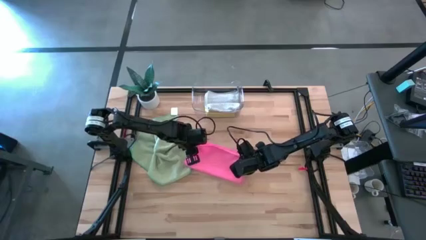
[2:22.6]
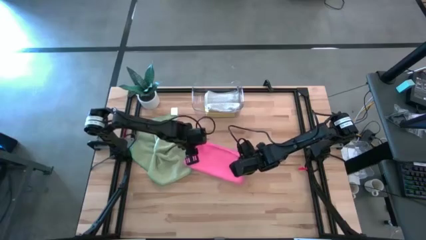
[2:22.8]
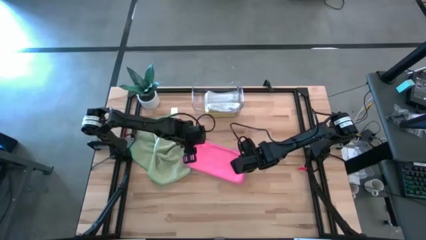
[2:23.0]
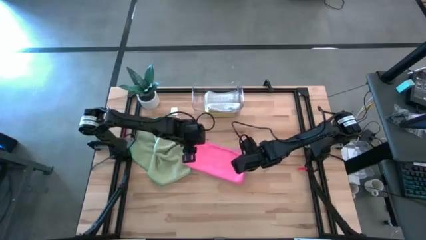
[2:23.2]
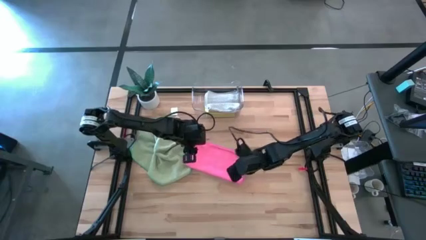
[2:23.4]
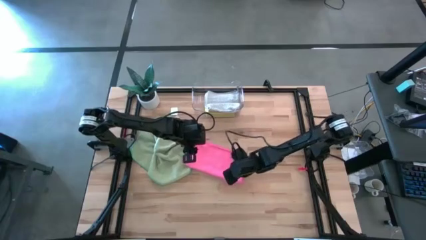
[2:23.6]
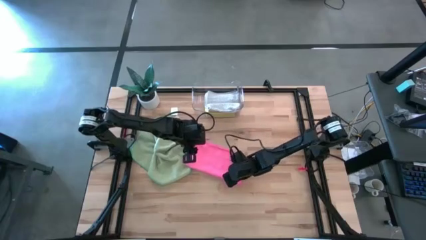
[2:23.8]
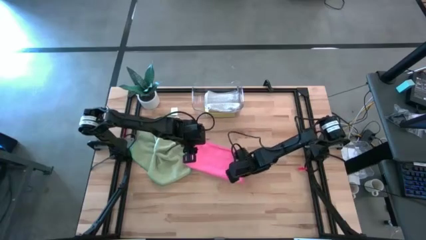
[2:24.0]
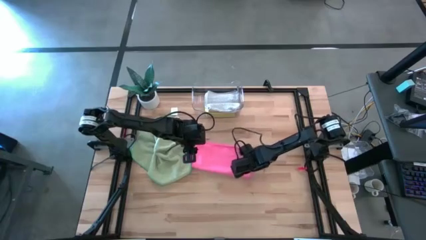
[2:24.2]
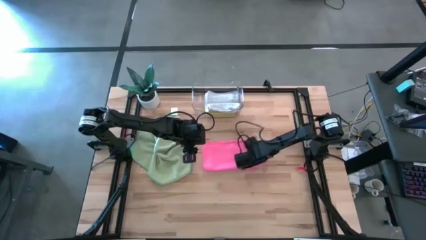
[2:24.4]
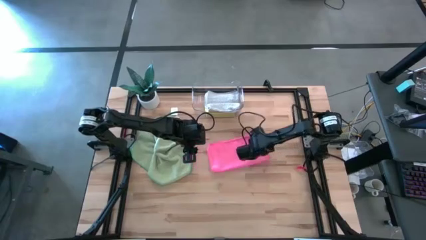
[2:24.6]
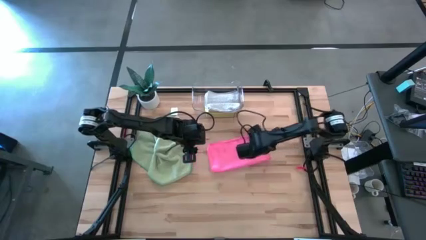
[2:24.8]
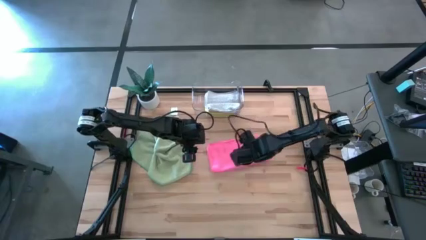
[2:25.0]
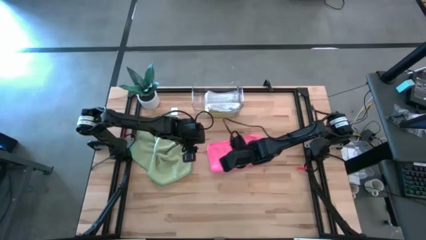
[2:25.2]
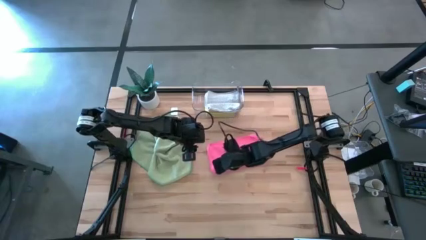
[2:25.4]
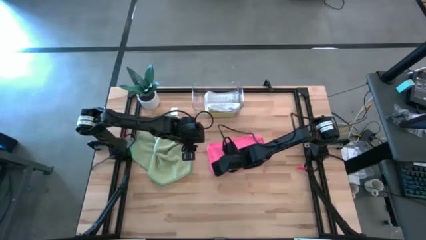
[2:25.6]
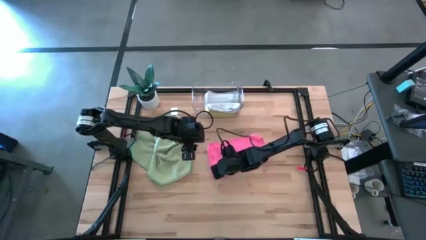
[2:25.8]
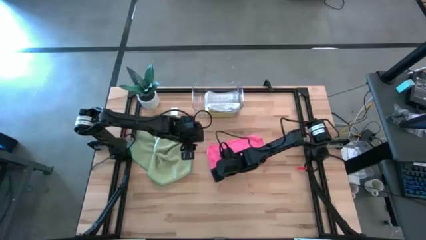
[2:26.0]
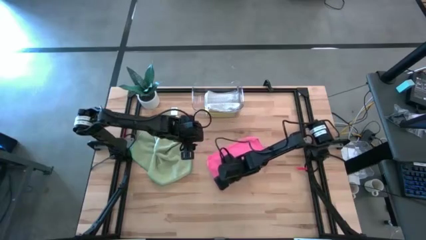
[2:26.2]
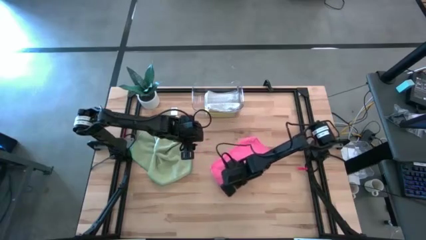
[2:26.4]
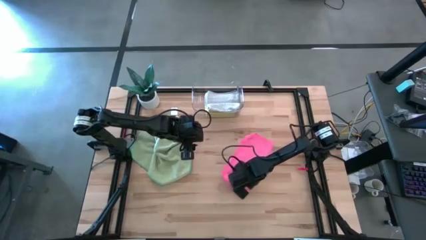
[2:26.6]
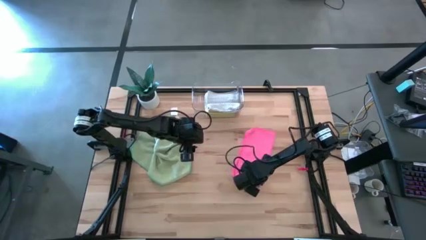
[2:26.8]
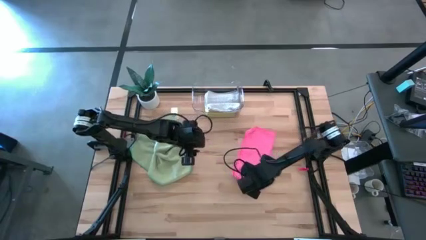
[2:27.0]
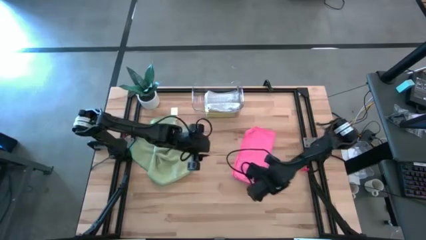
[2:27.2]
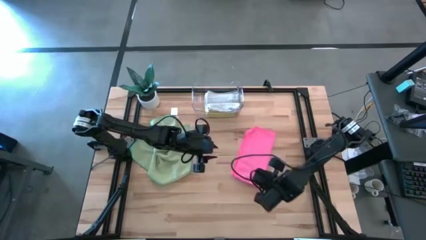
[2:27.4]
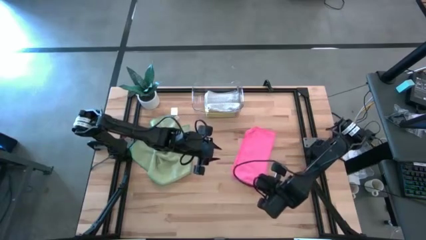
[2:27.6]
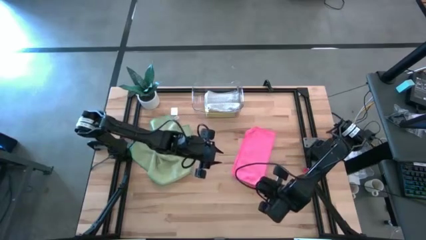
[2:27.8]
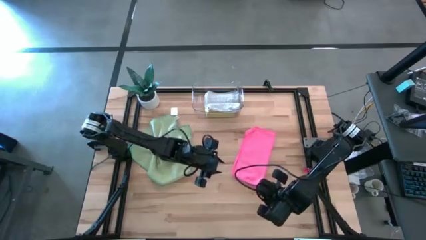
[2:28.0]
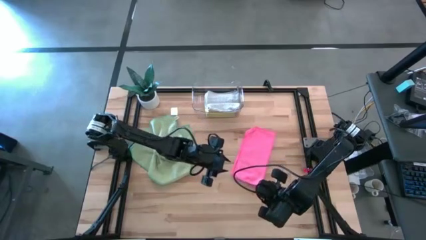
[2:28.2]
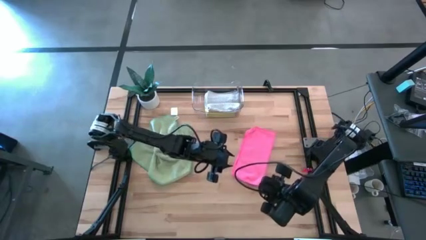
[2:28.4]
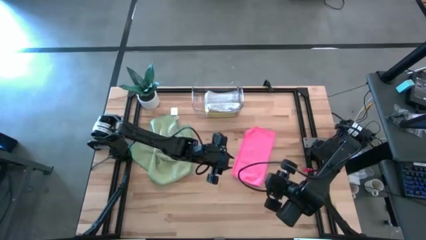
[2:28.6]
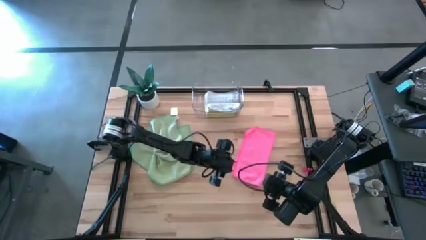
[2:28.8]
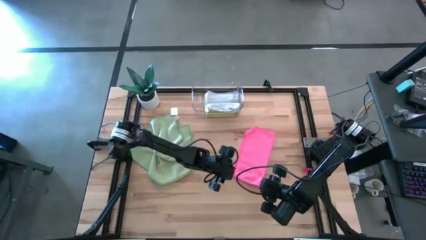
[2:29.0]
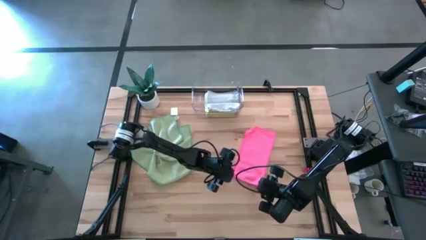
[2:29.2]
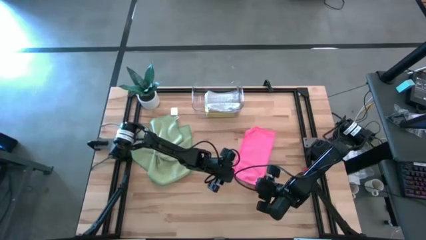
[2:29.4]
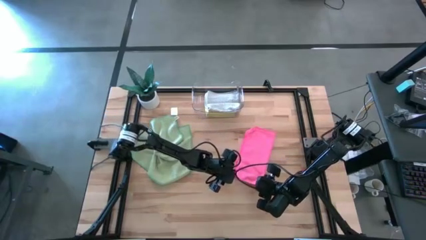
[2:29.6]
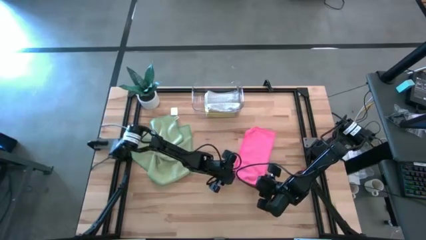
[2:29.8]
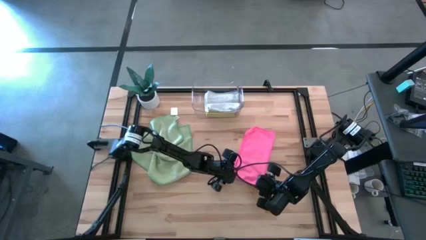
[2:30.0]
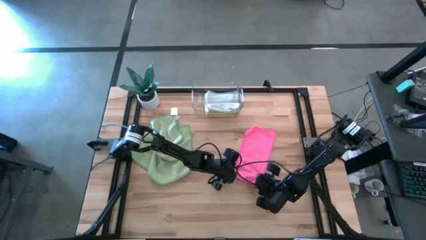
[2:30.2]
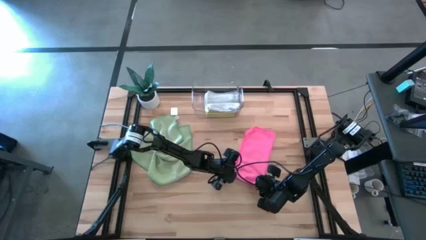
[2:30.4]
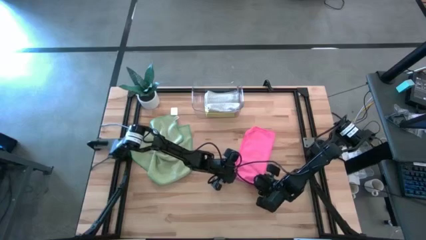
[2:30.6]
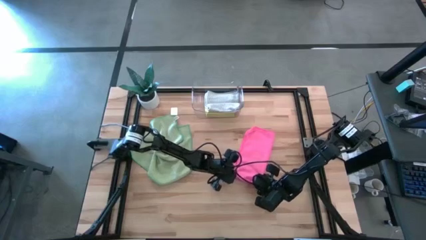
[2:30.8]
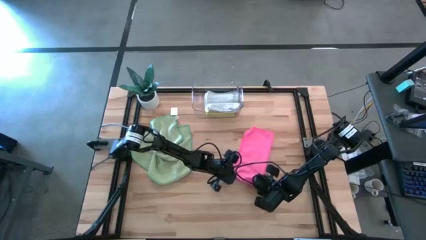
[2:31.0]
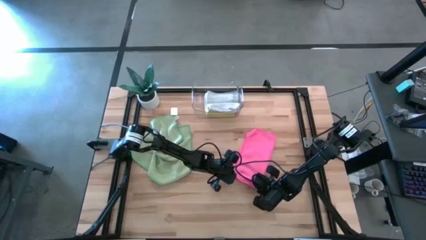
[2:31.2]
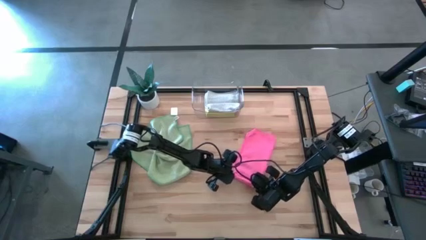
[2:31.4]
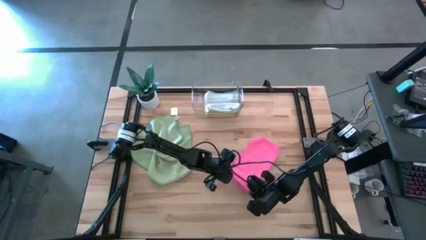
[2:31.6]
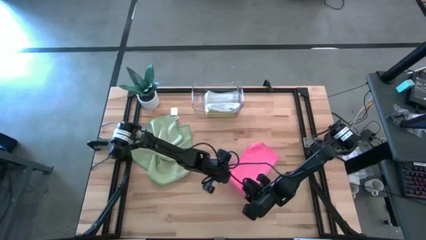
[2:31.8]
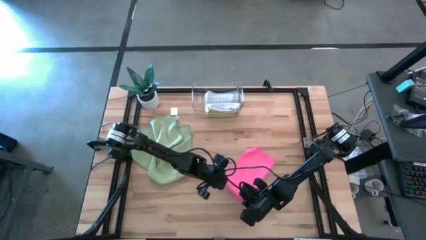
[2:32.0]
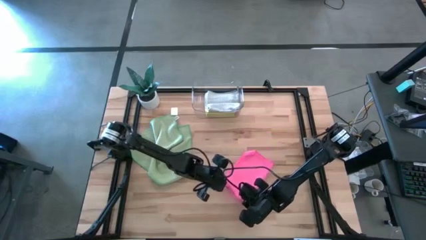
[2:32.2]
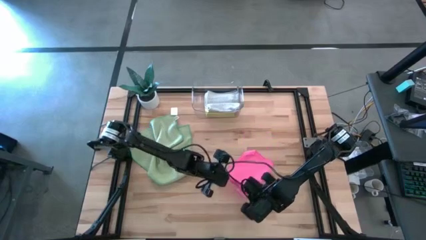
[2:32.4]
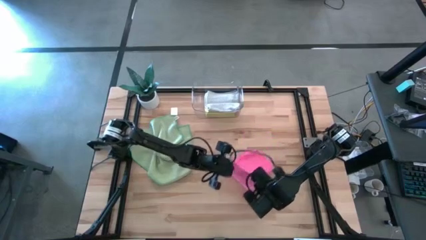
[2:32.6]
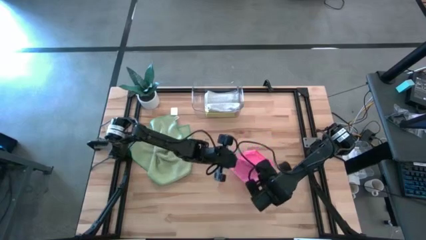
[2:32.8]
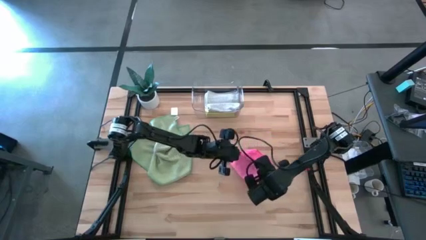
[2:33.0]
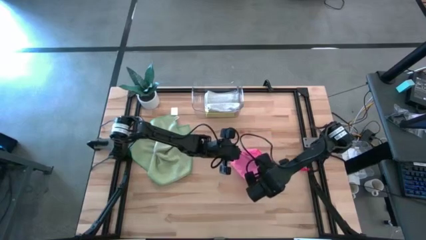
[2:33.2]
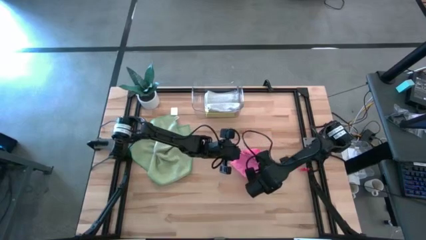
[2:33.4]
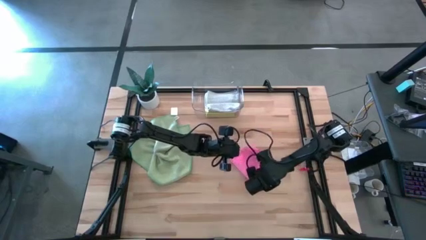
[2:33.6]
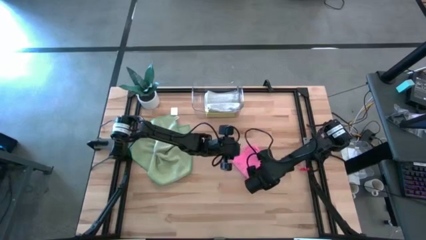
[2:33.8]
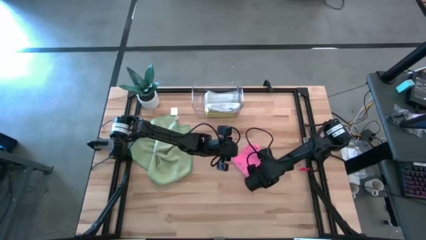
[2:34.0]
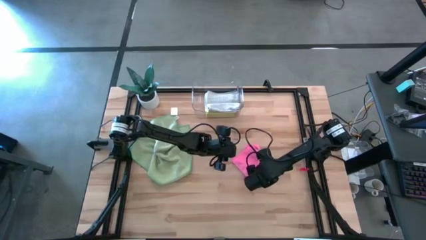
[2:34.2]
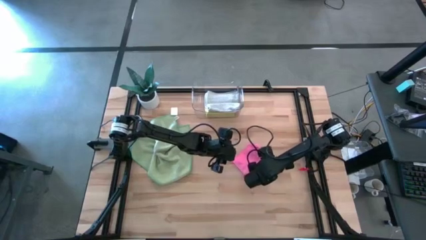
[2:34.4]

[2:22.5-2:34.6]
Task: Fold microfiber towels
Fold the pink microfiber cloth

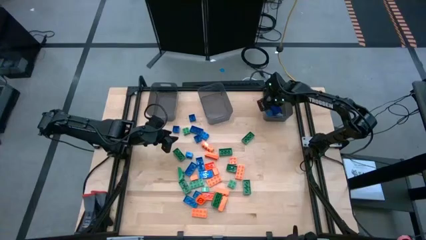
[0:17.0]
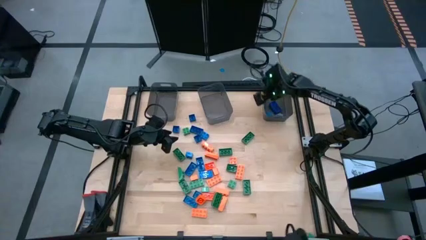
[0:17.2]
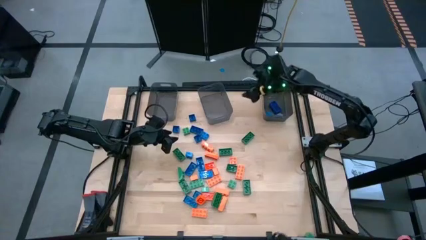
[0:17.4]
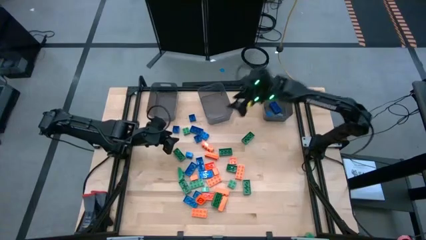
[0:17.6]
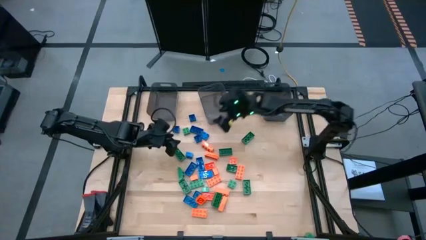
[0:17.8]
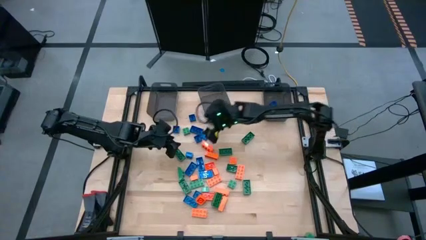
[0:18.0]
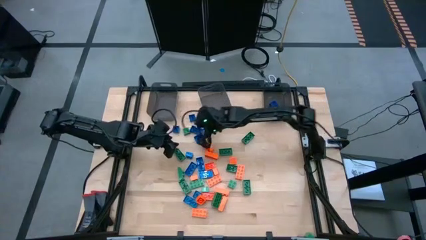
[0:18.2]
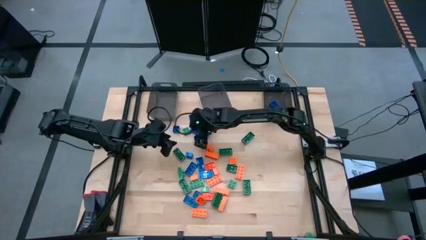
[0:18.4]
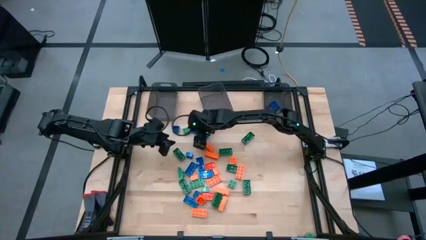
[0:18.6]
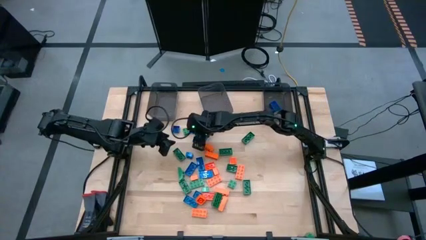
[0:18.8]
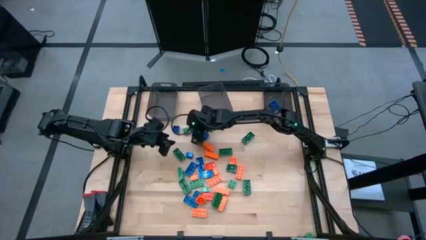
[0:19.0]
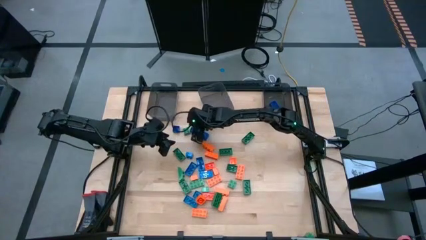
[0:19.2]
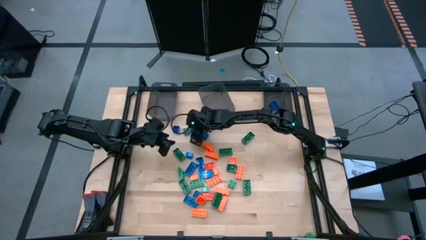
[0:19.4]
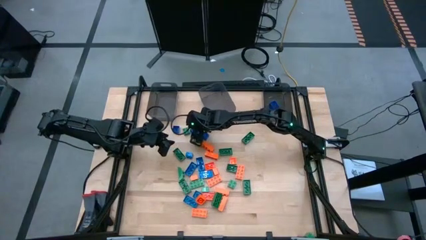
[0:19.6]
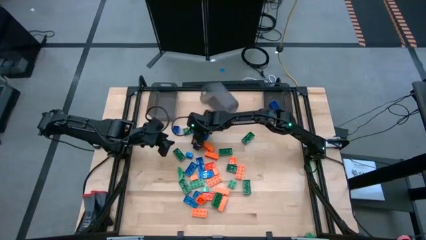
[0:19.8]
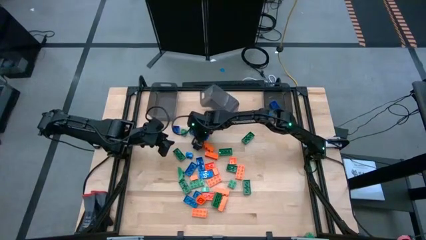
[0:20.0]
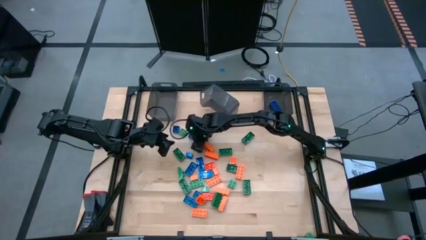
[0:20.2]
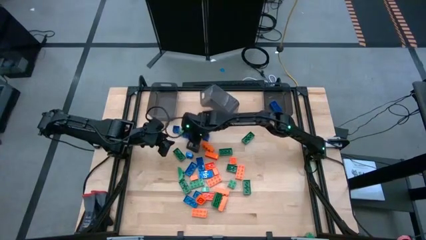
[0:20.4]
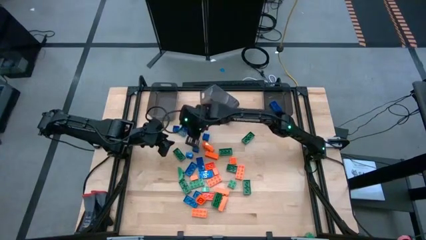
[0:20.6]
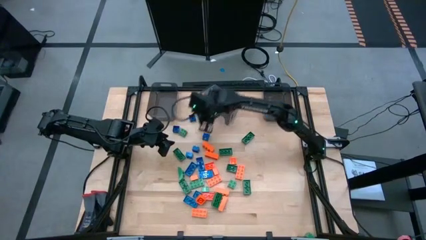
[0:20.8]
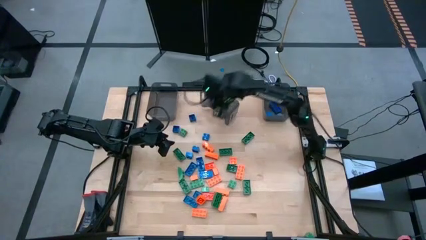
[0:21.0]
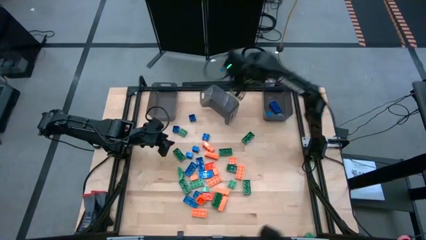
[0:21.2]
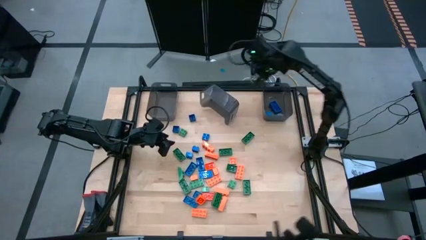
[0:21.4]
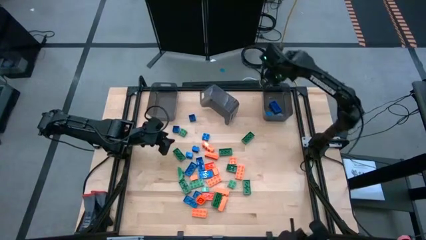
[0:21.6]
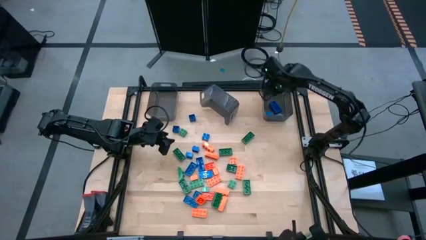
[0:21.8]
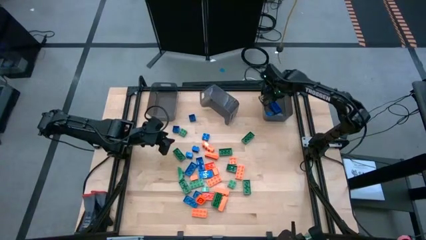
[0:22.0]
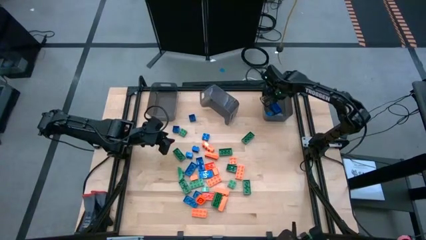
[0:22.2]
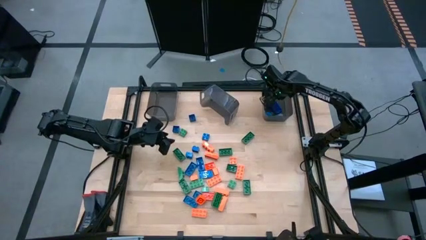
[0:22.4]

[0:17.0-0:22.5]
Task: Sort blocks
Put the blue game piece into the right black bin
